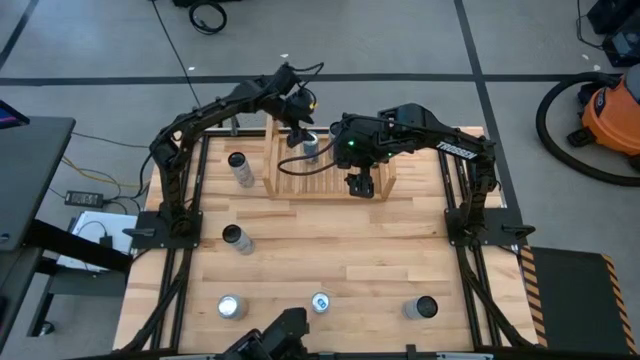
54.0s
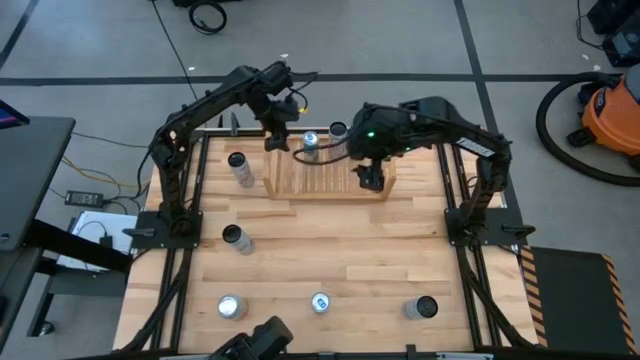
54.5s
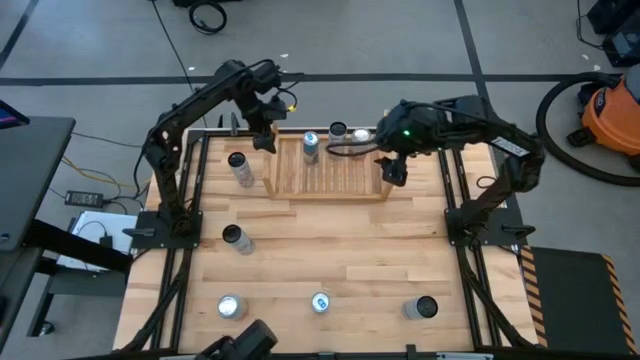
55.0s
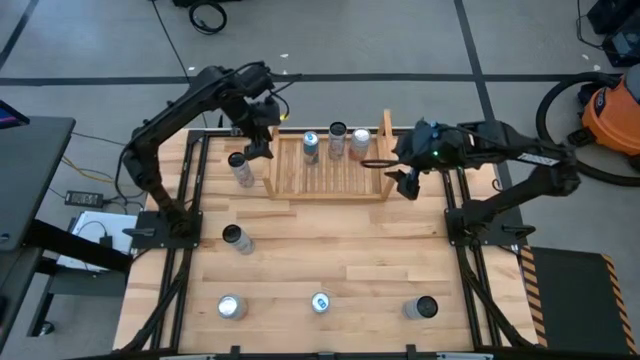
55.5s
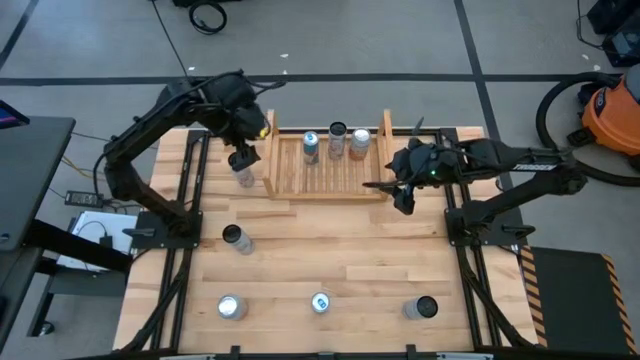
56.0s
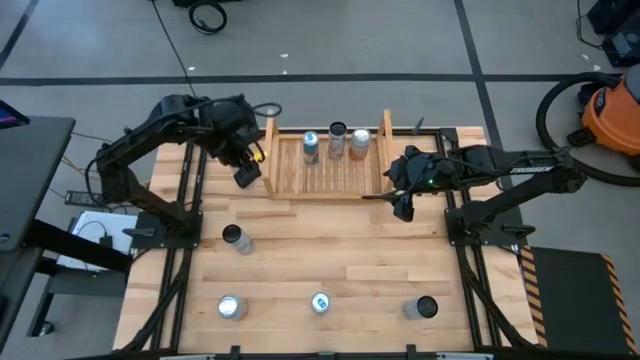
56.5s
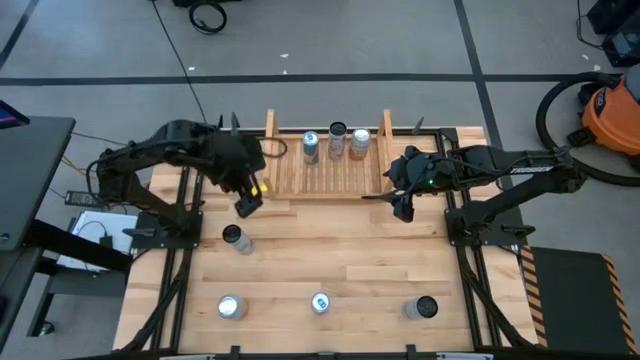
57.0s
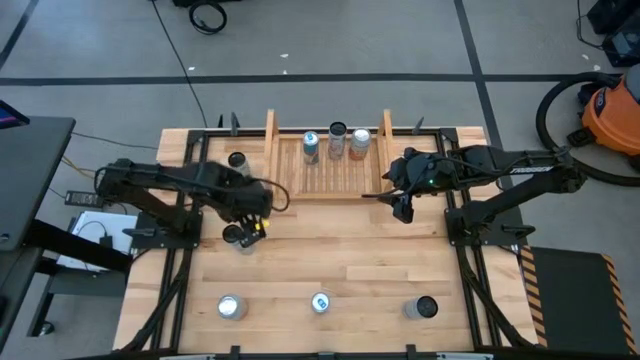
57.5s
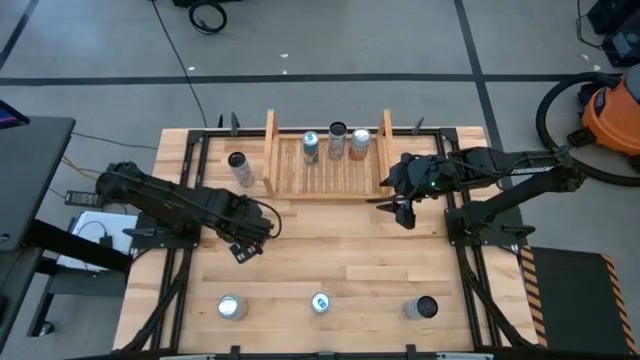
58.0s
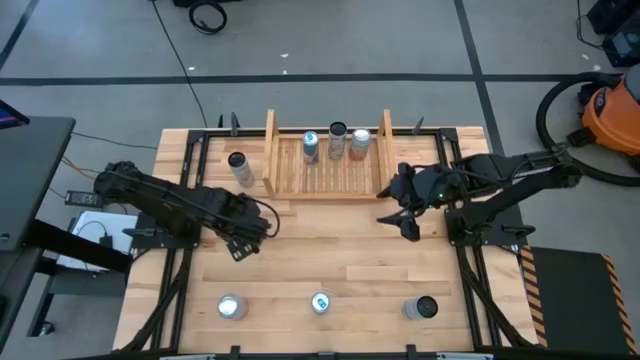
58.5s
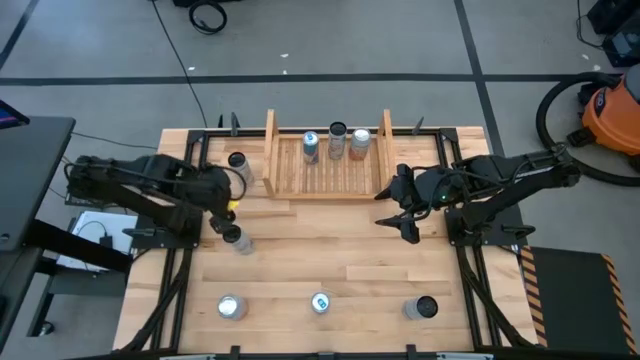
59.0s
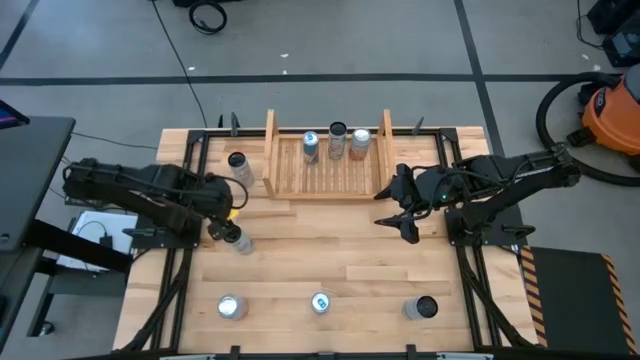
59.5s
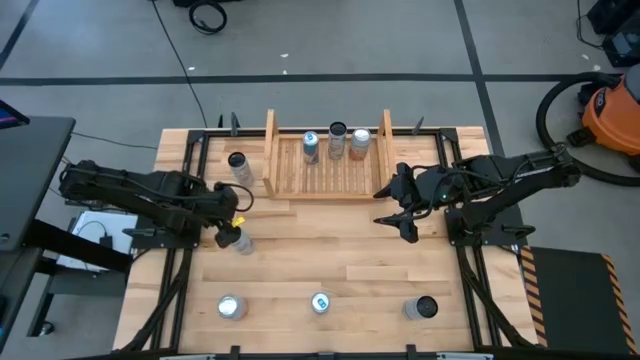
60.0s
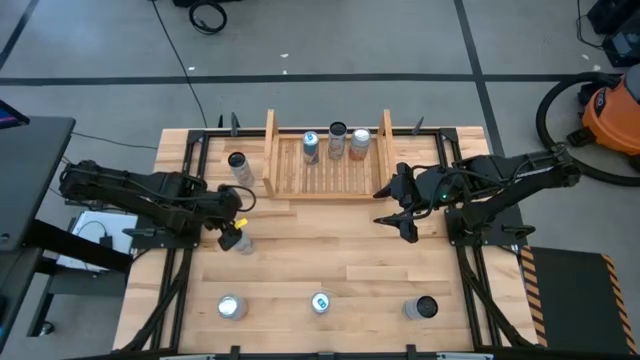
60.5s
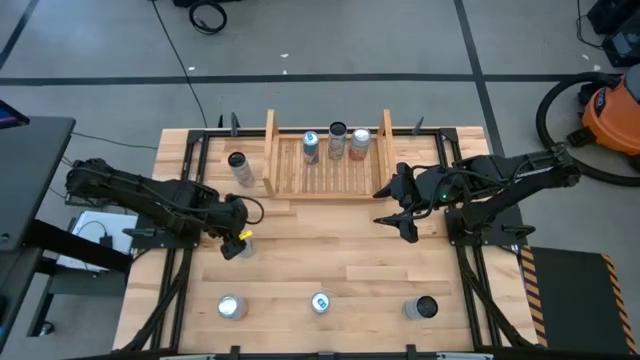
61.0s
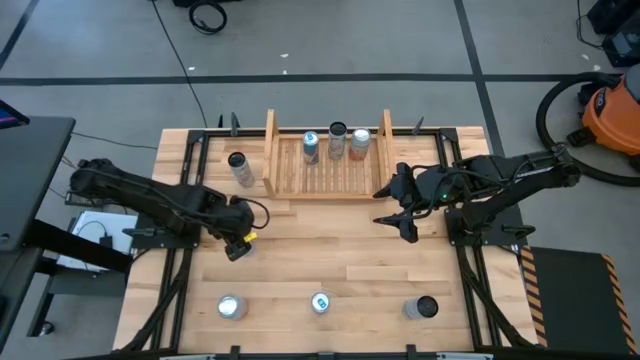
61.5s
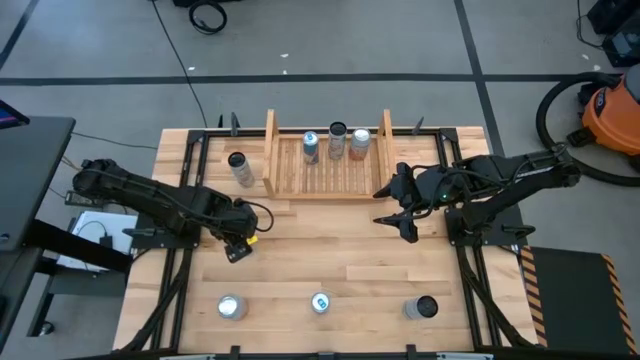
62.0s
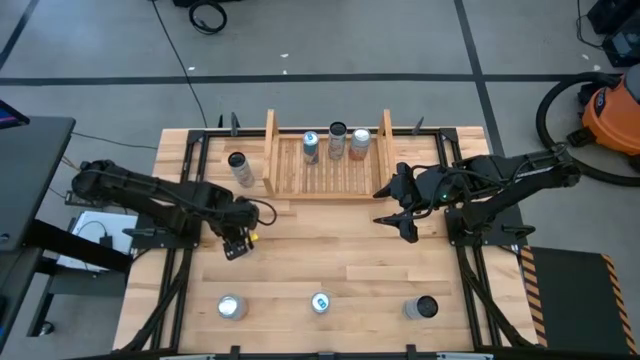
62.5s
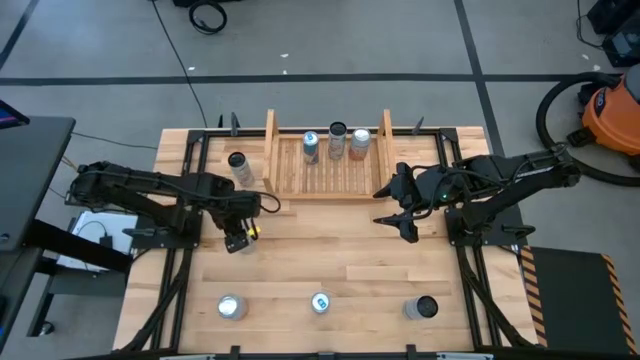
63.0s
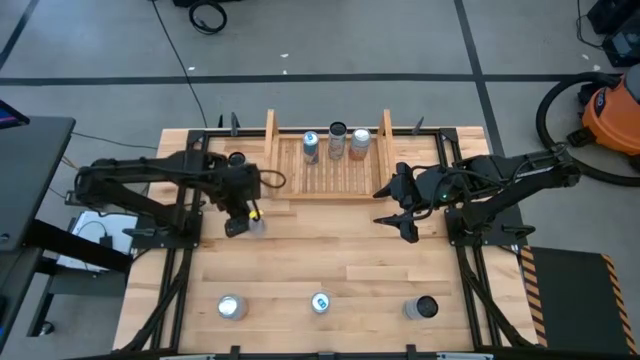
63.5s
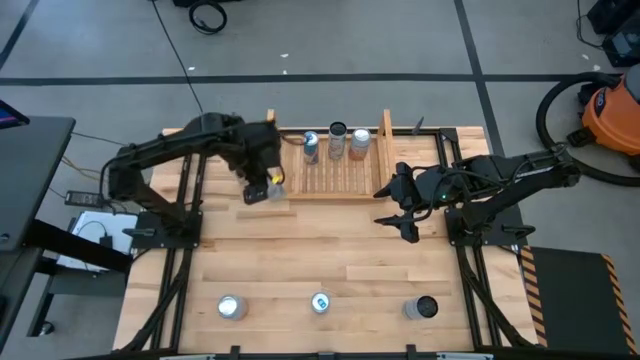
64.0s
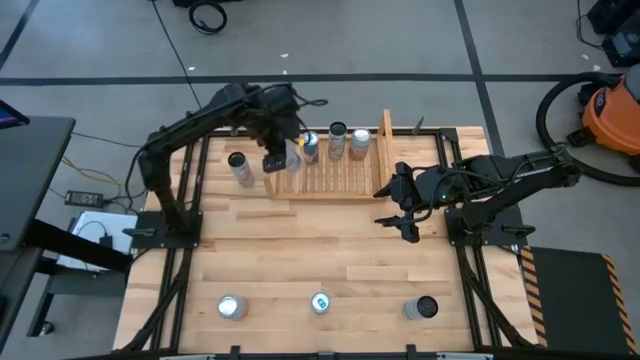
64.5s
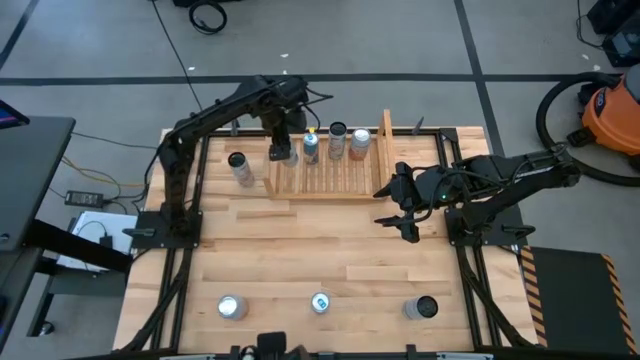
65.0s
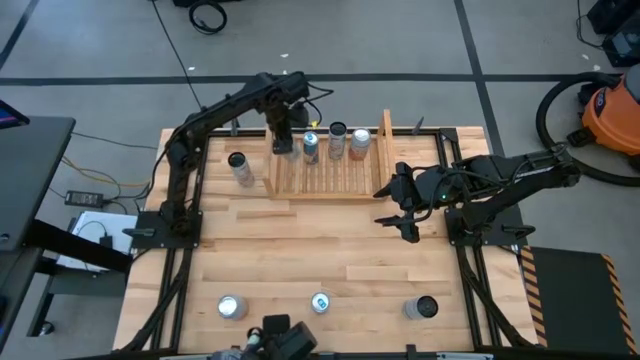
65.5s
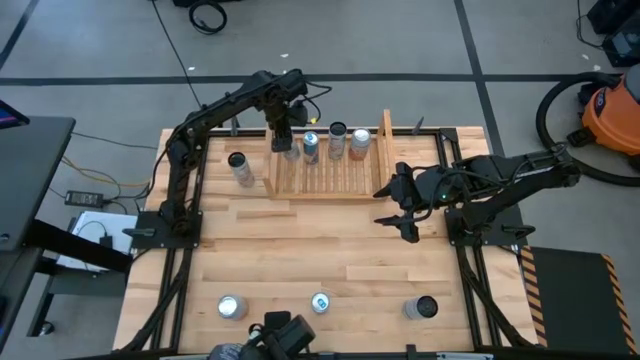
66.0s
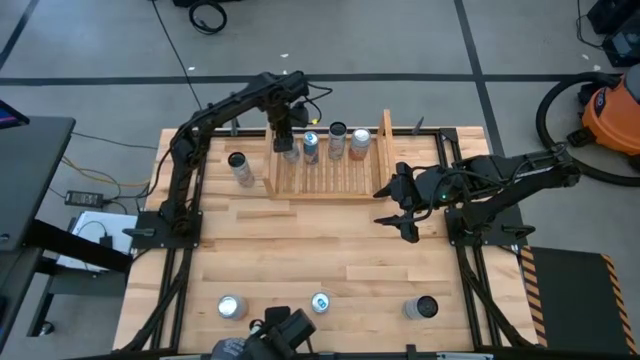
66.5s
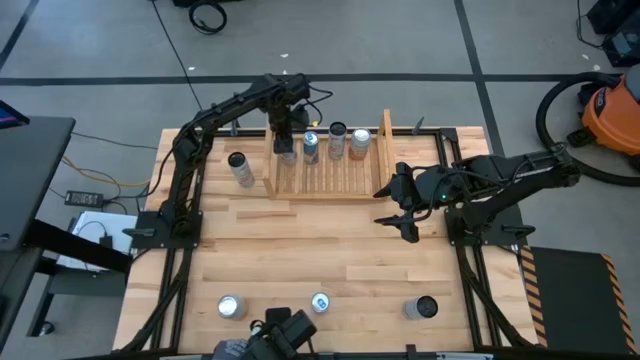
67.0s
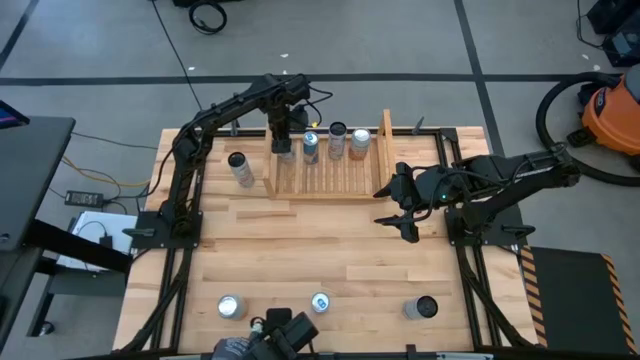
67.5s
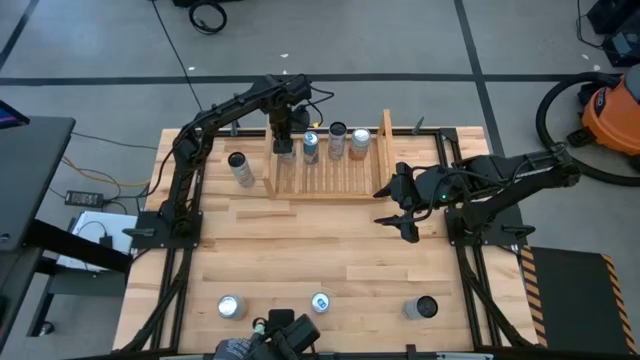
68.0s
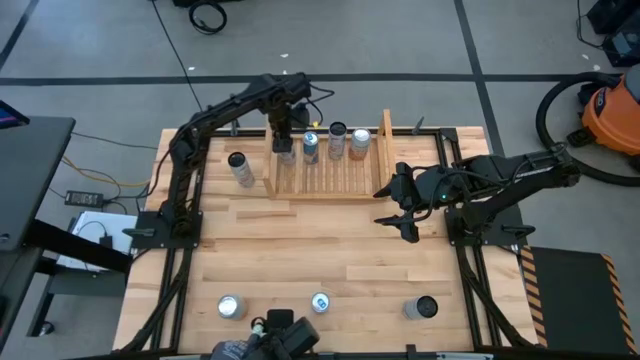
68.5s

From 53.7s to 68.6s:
Task: Place canned beverage on shelf
Put the top white-blue soda can on the shelf

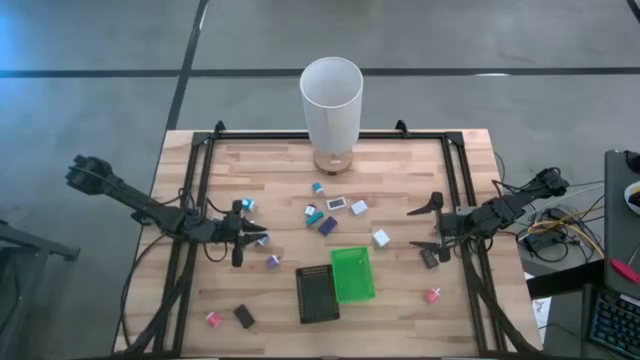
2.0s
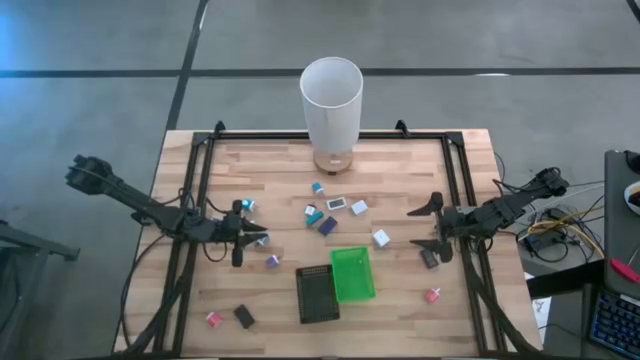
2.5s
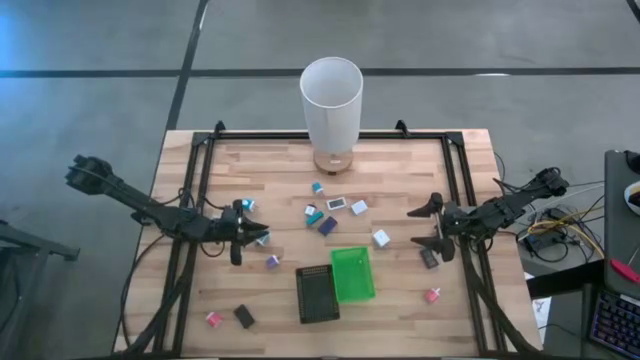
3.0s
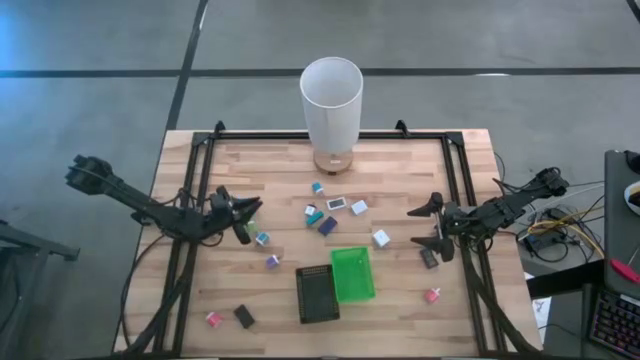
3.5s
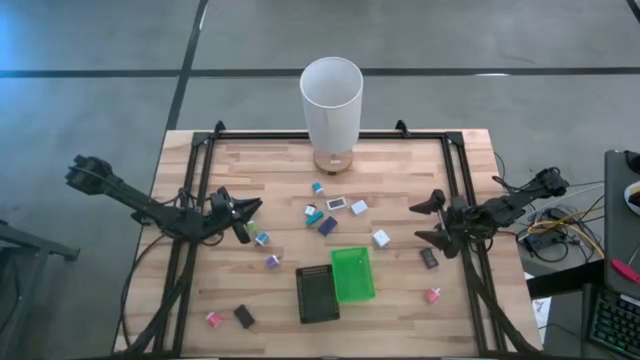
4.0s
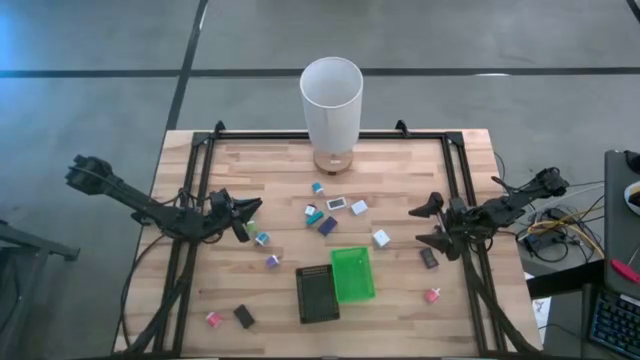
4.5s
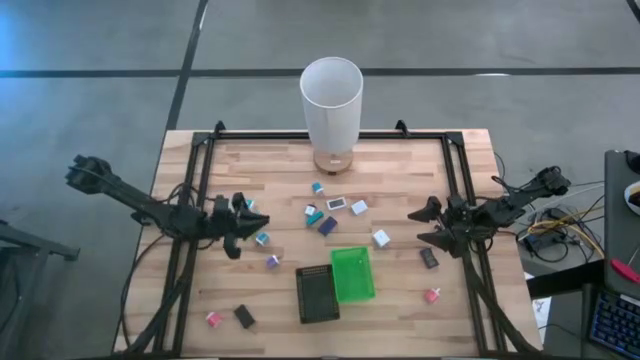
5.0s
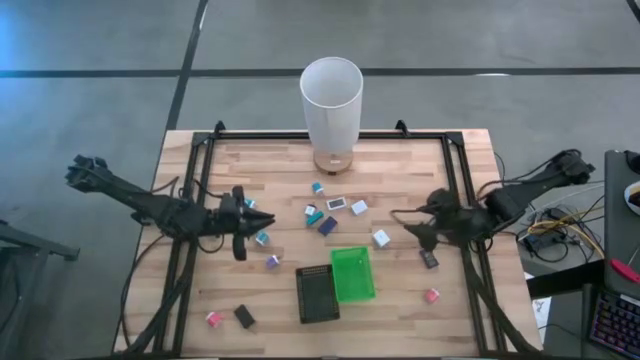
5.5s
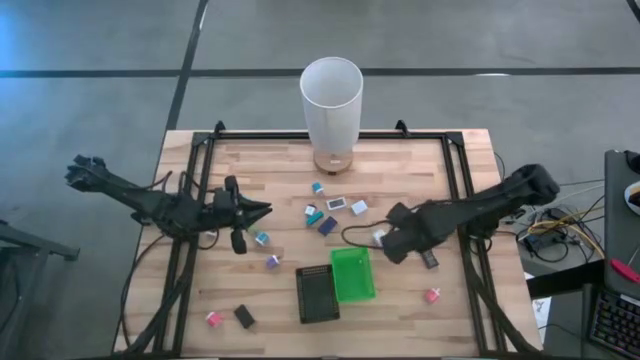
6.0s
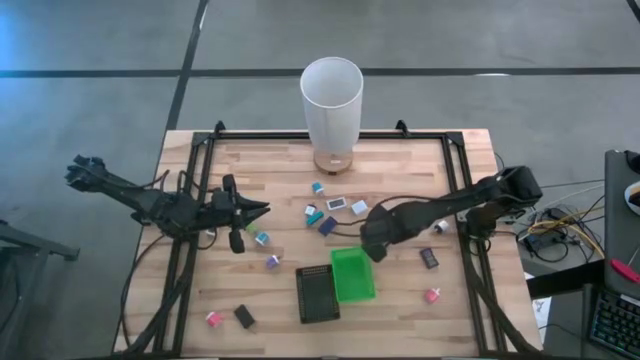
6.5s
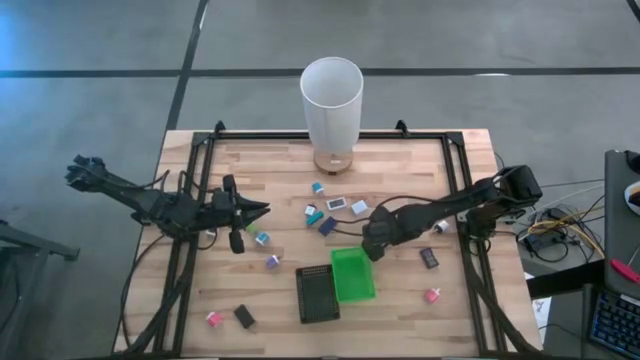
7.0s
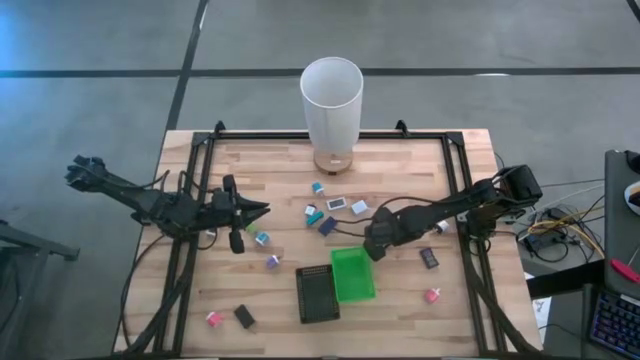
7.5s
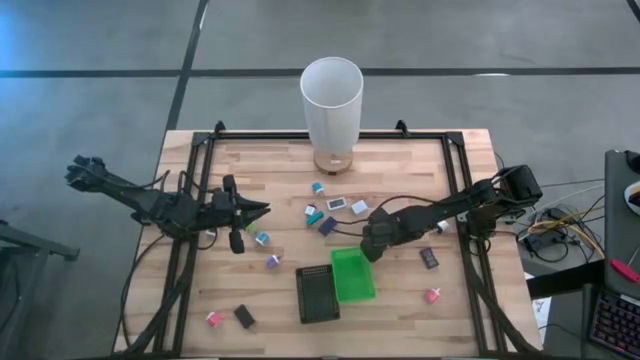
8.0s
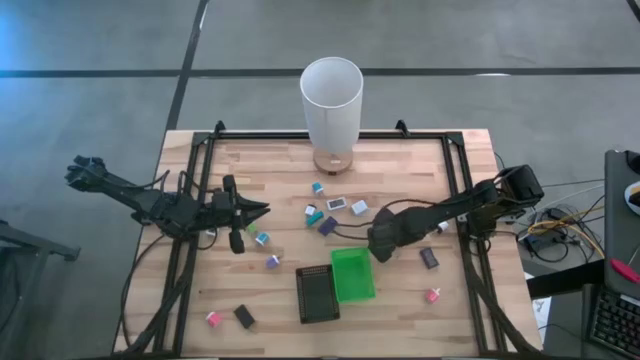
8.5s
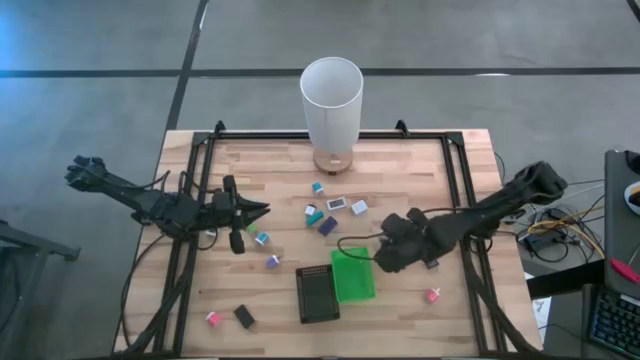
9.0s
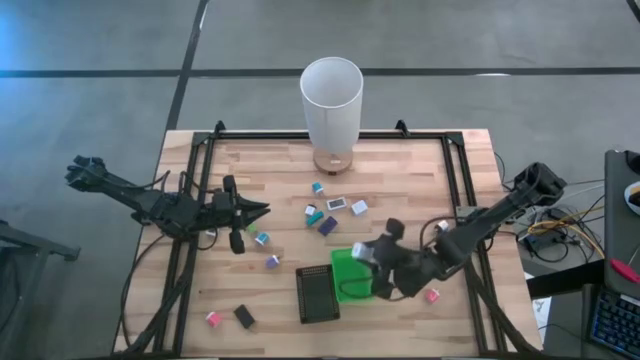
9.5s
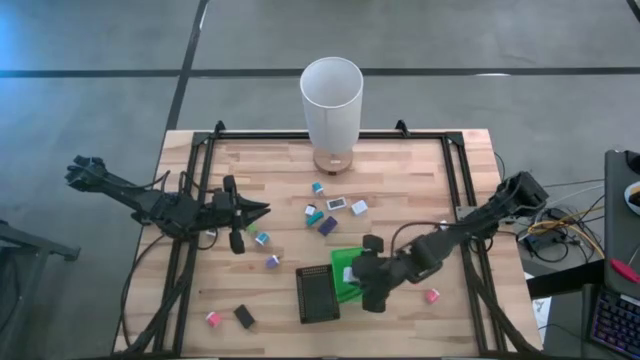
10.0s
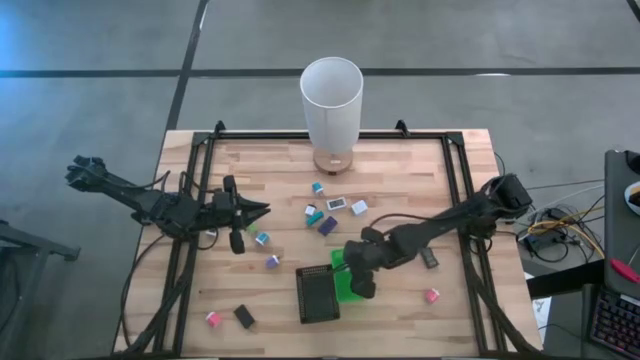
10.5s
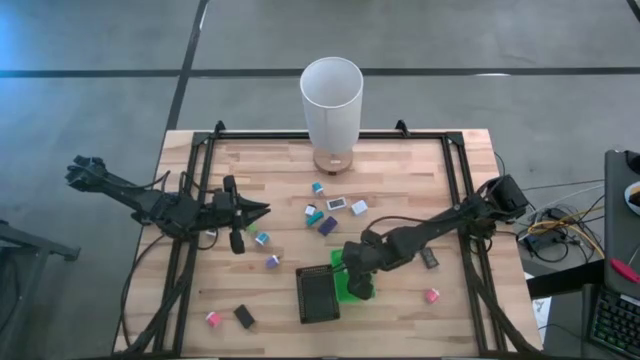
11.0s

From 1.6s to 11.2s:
Task: Pick & Place Office items
Put the bottom white charger adapter into the green bin
